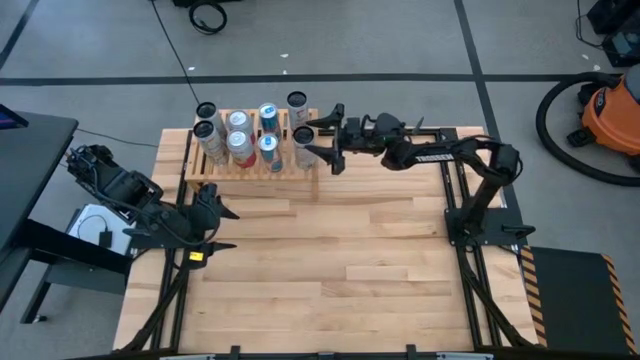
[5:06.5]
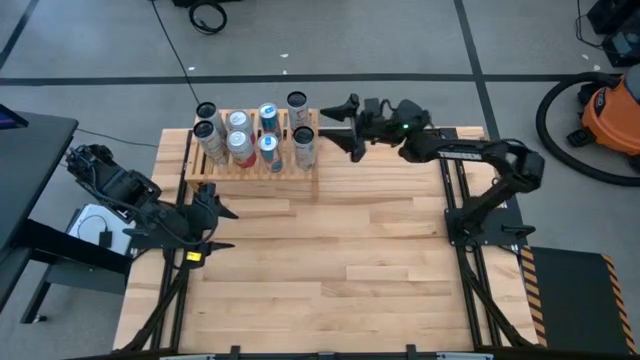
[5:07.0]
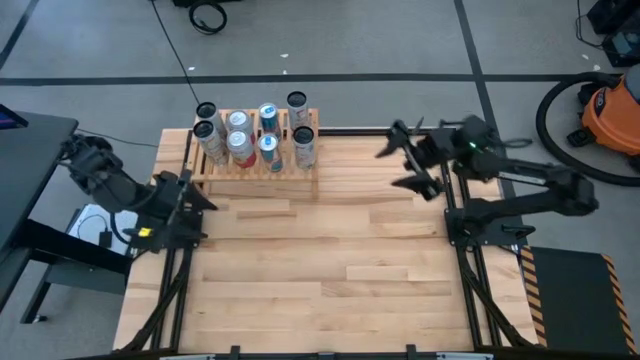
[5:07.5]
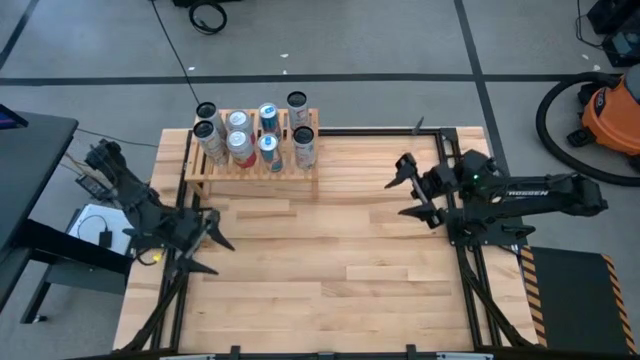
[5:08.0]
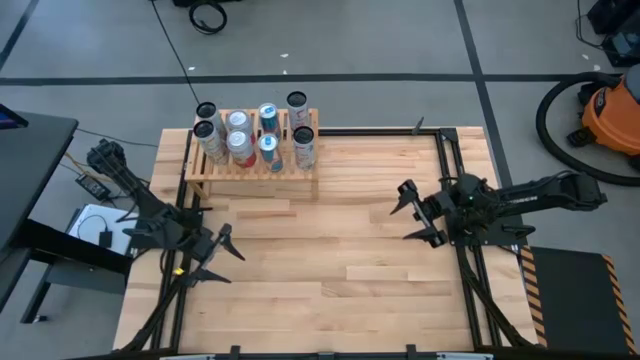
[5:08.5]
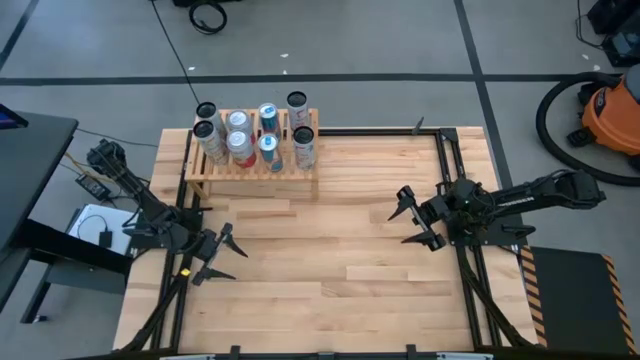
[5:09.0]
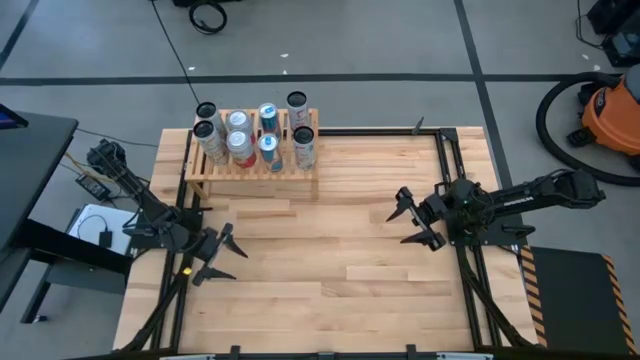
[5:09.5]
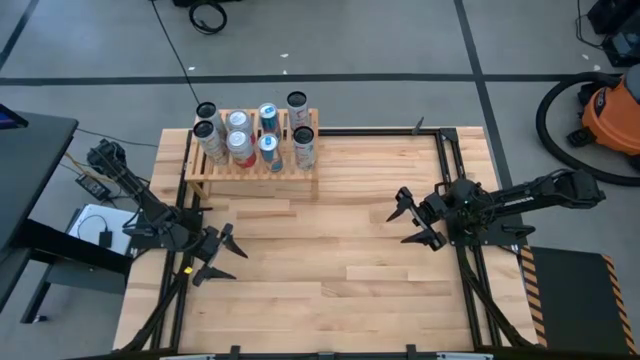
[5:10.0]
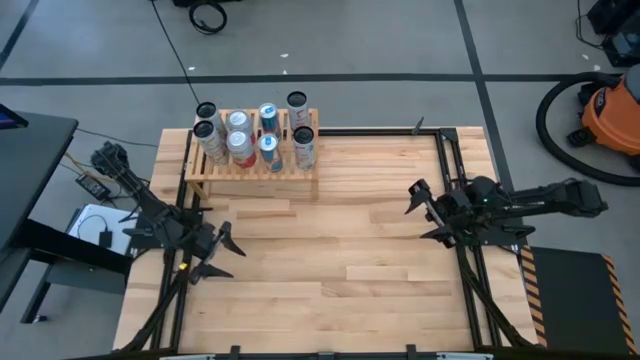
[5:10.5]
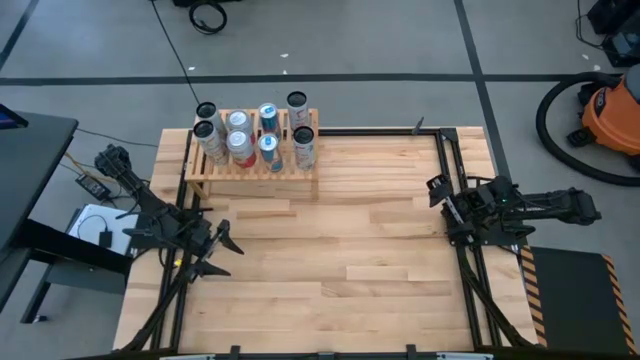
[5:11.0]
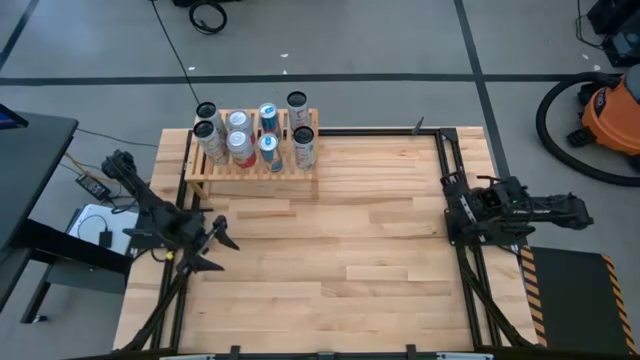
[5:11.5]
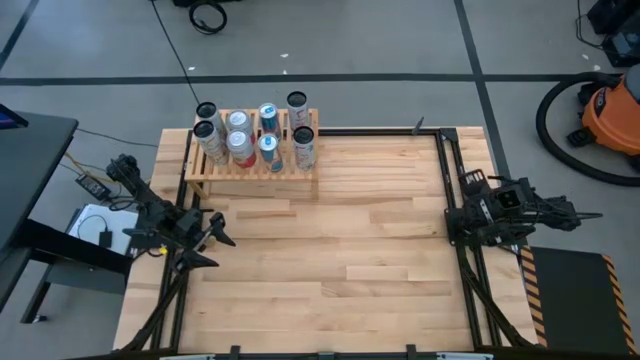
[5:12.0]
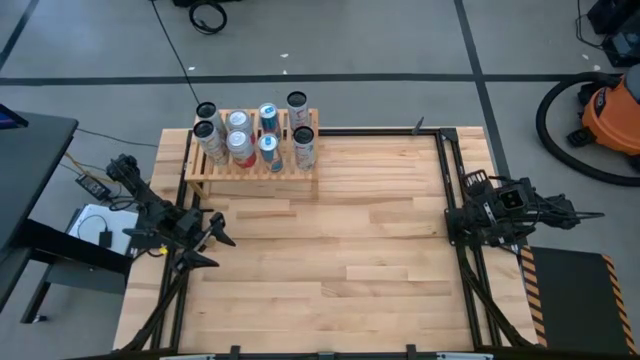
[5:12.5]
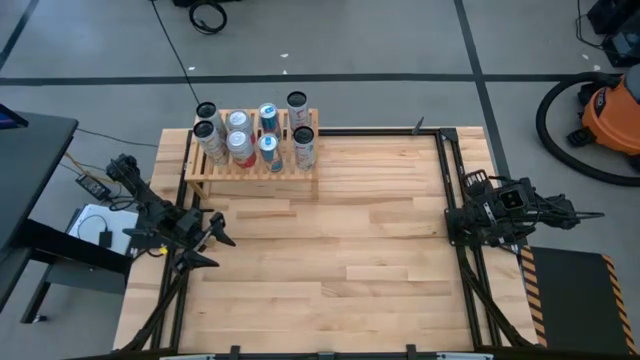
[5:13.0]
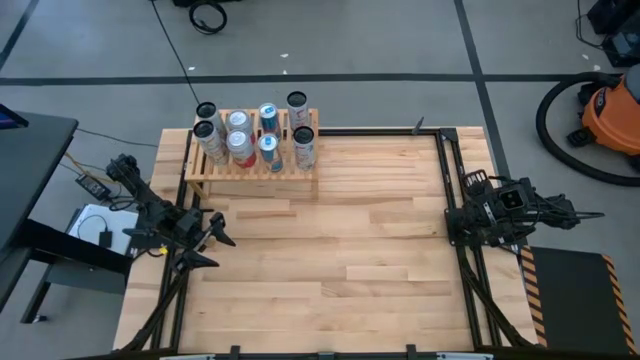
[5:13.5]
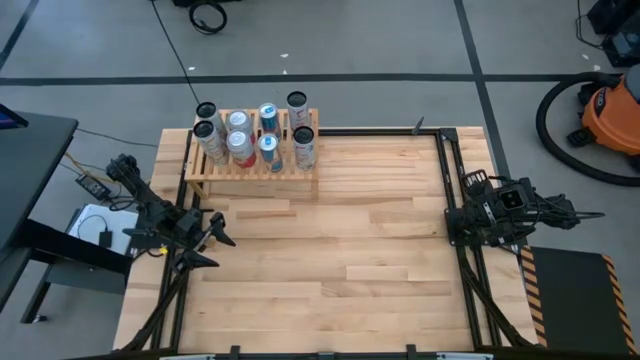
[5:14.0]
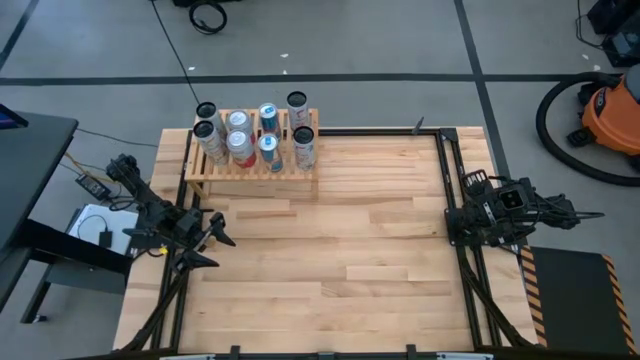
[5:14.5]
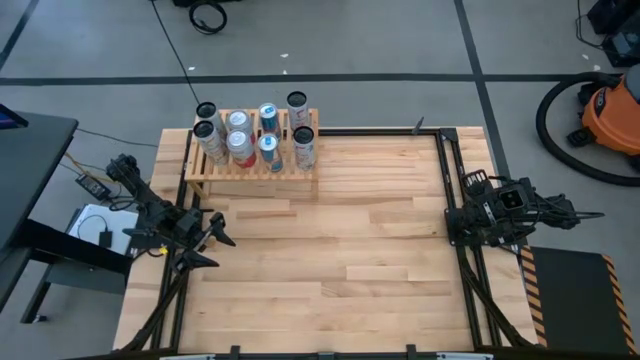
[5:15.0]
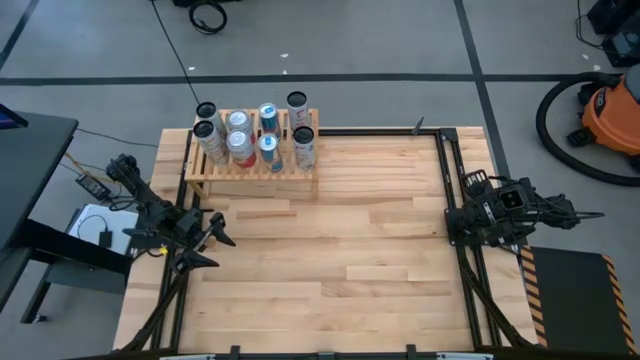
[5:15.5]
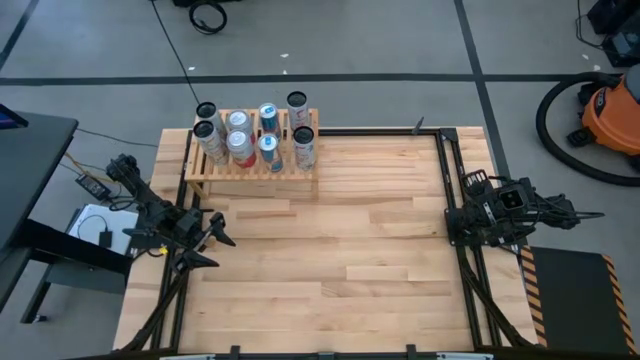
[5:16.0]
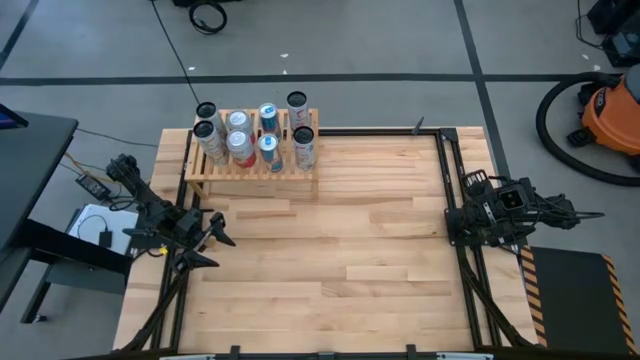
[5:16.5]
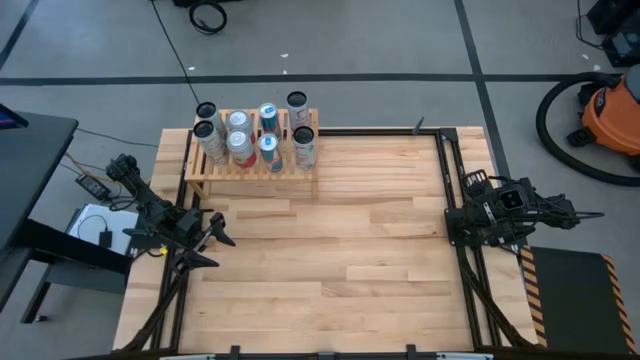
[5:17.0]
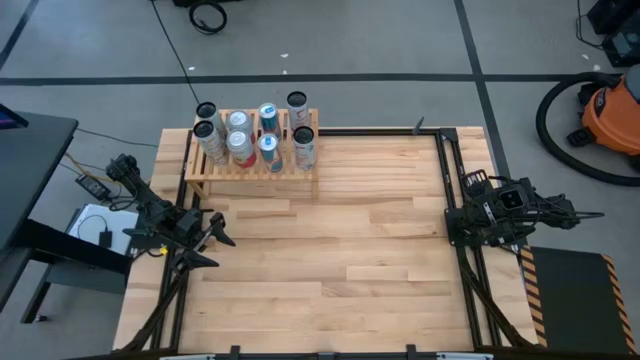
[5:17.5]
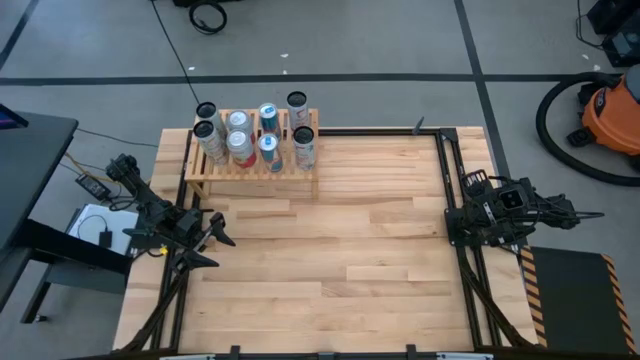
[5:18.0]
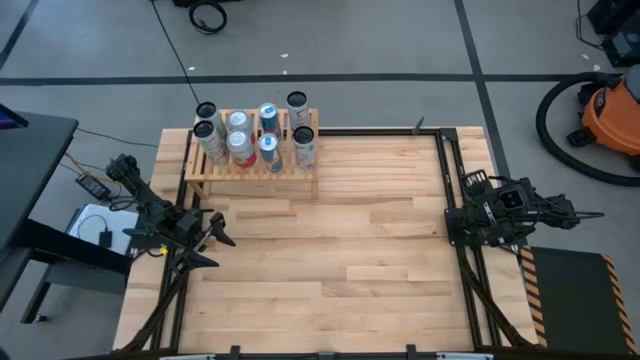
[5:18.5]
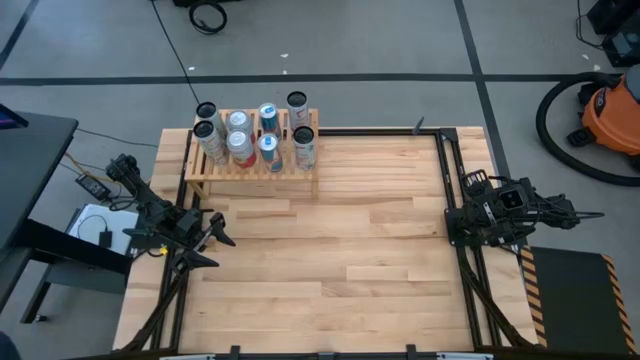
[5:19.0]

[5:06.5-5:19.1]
Task: Place canned beverage on shelf
Return to Home Position

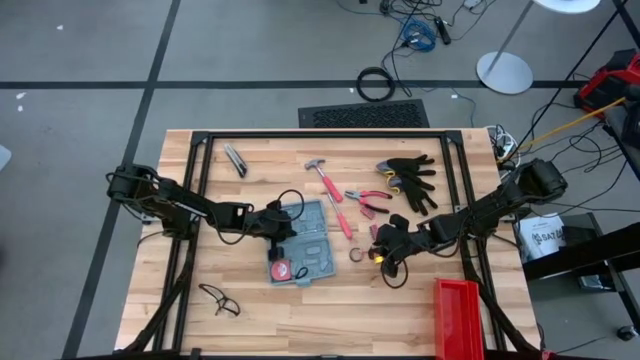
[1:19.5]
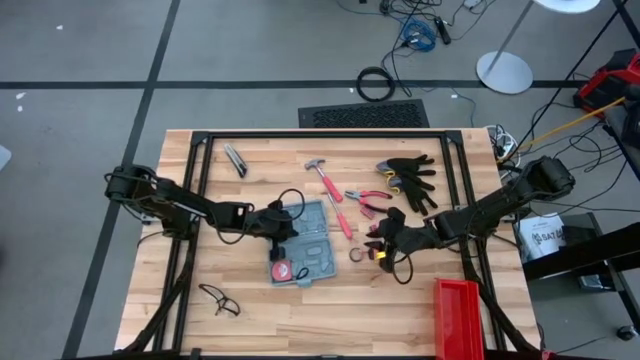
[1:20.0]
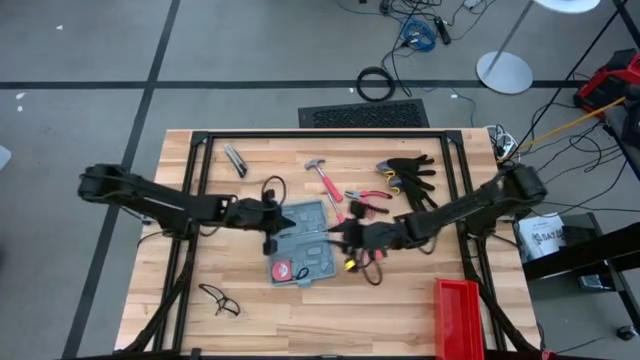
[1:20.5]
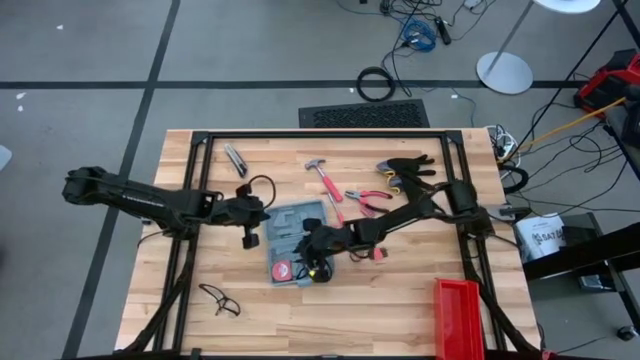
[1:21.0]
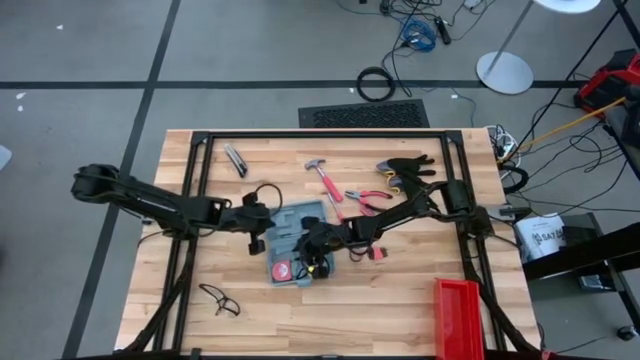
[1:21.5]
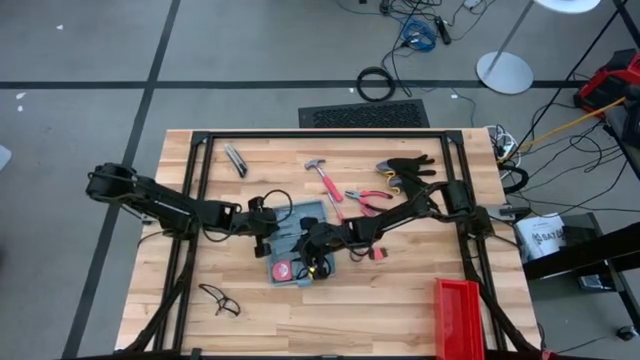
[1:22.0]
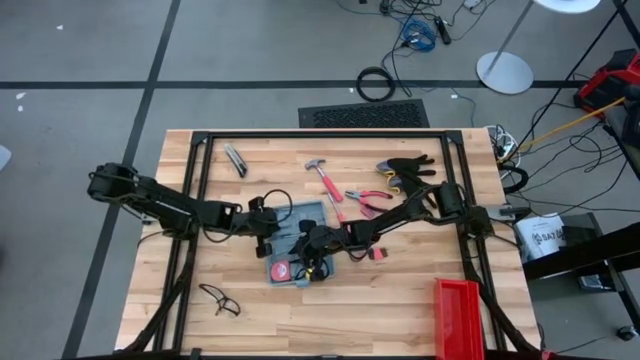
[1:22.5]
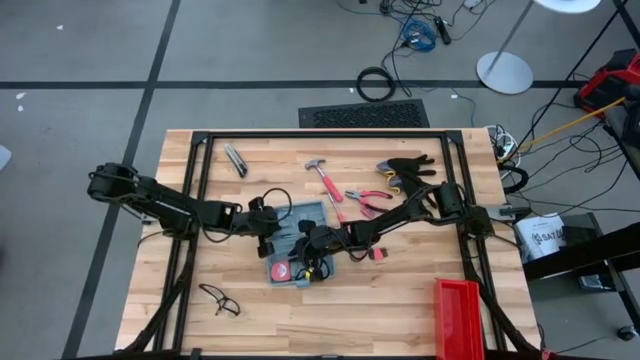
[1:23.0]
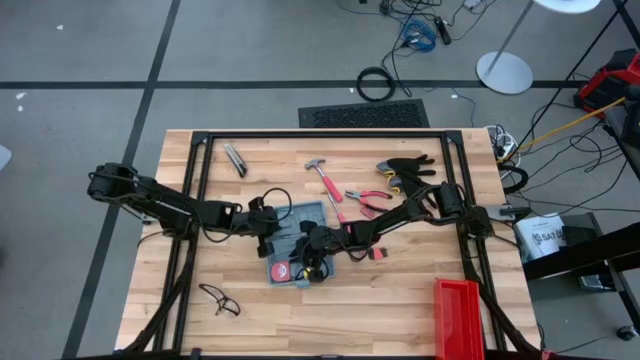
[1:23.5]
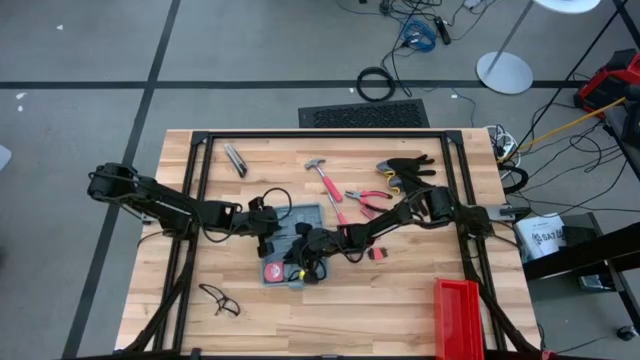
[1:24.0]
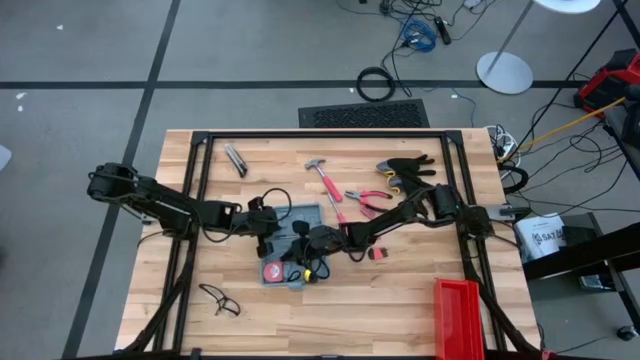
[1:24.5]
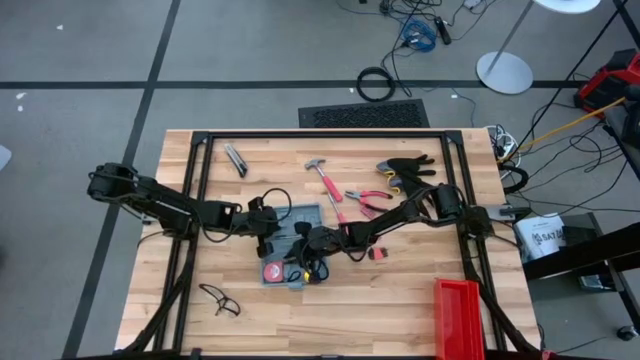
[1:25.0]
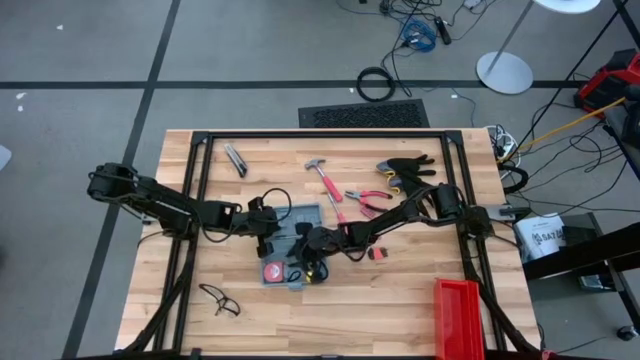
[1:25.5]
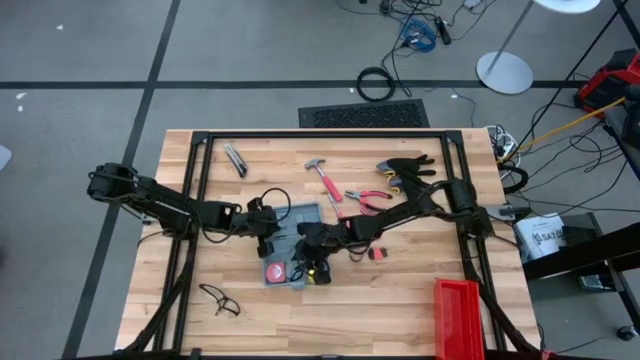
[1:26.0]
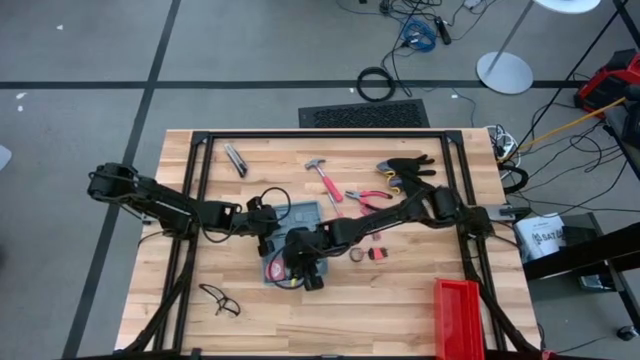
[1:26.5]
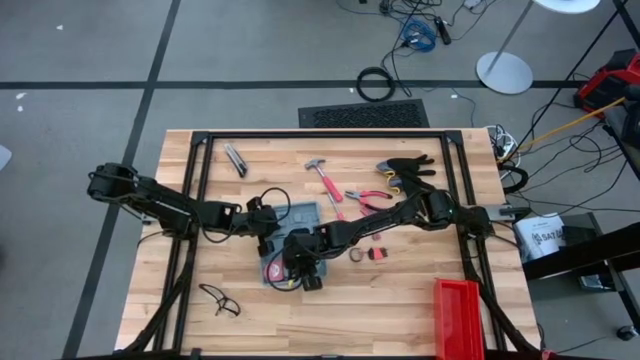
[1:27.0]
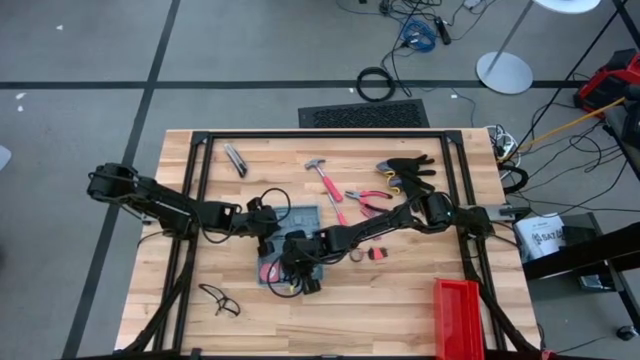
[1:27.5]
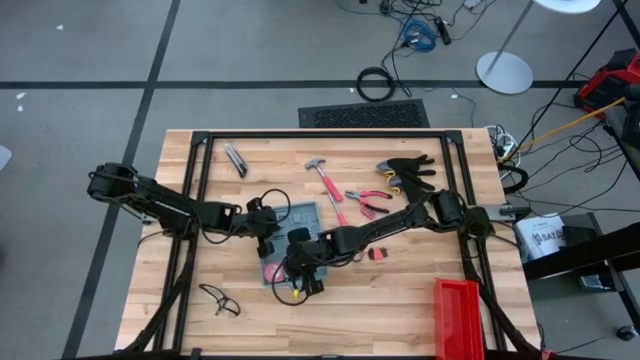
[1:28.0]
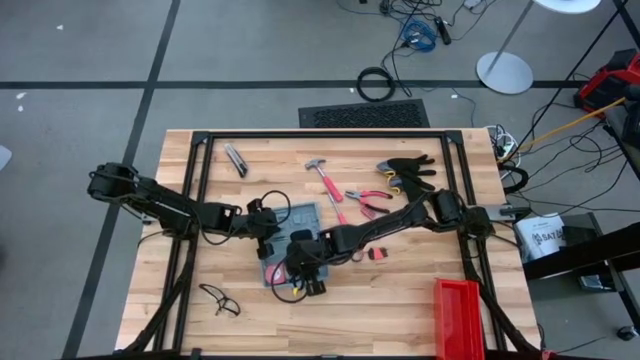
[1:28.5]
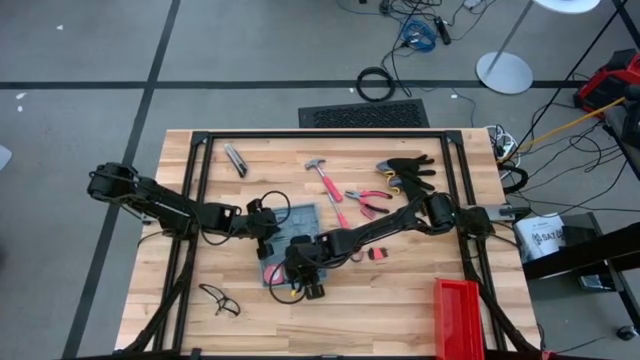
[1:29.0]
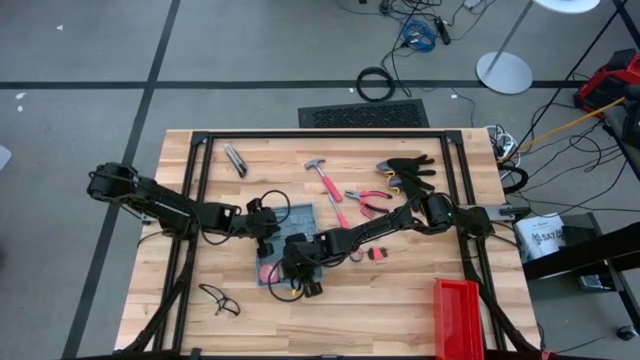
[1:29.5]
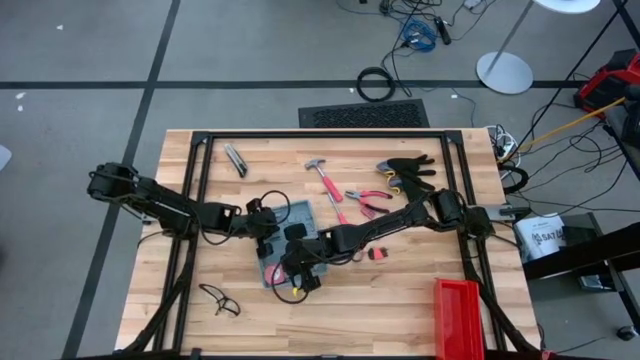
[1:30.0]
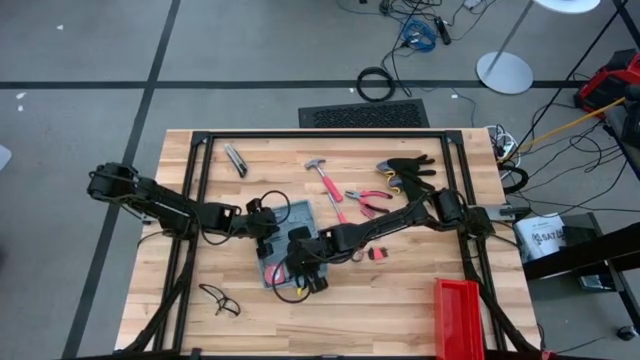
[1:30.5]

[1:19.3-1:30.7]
Task: prefit tool cases
Remove the pink tape measure from the gray prefit tool case
